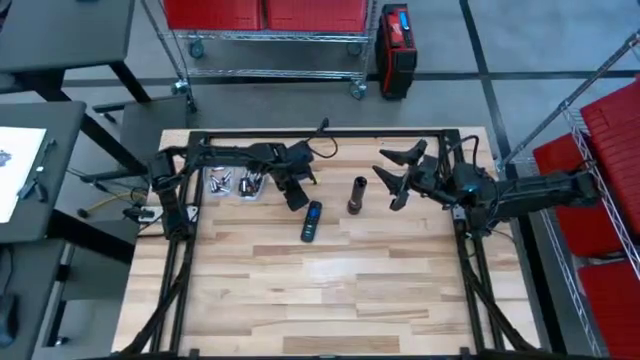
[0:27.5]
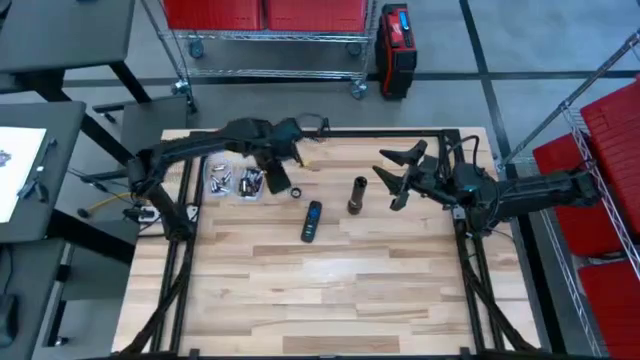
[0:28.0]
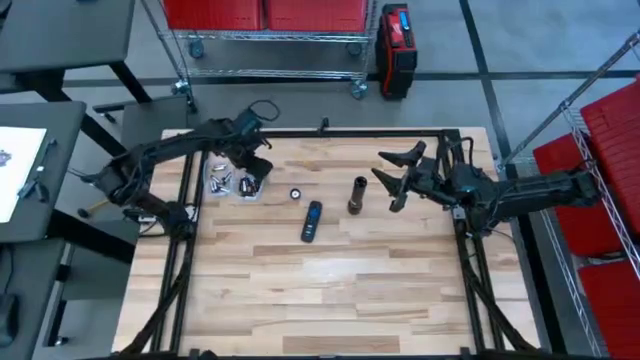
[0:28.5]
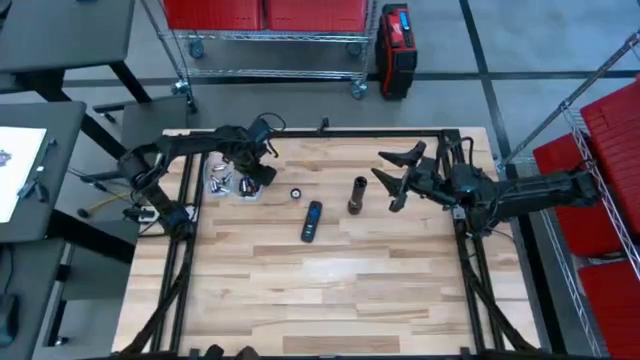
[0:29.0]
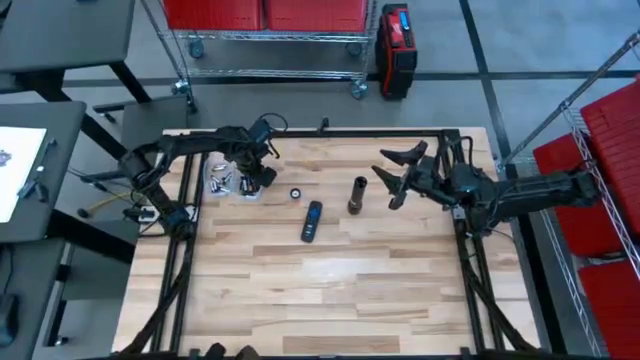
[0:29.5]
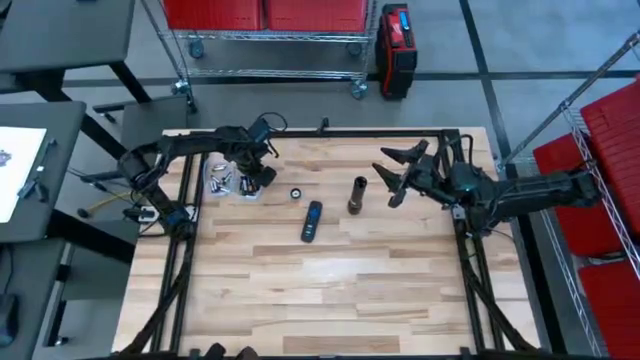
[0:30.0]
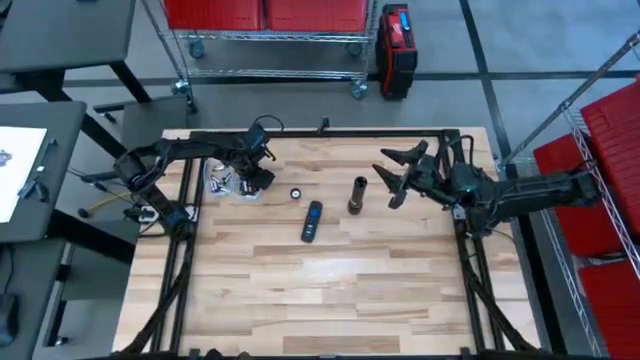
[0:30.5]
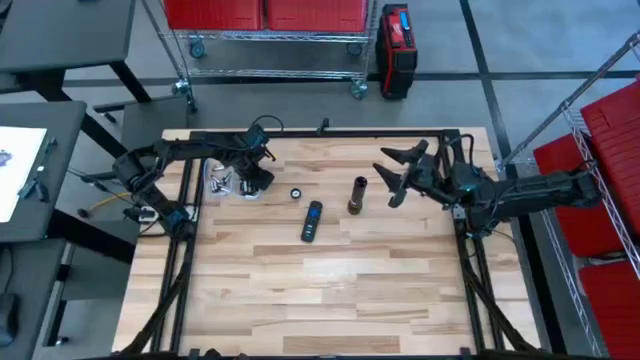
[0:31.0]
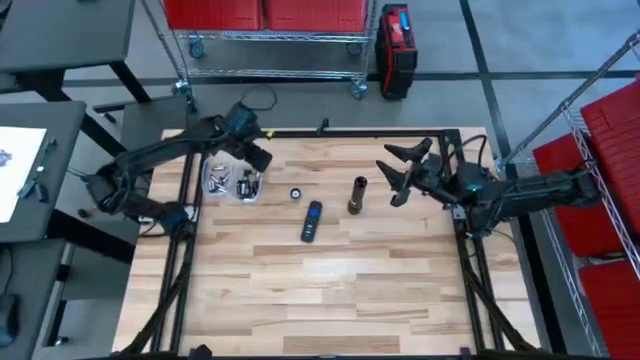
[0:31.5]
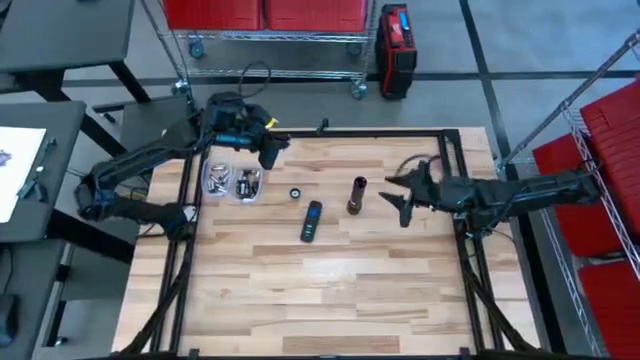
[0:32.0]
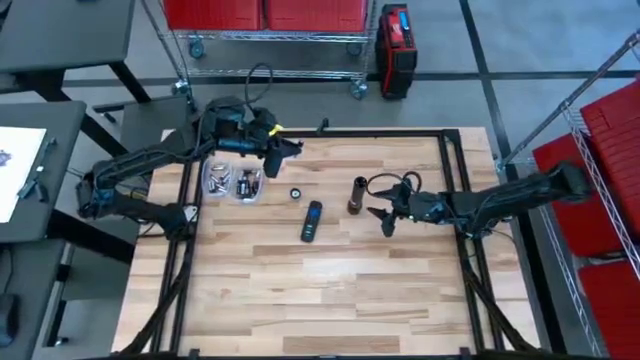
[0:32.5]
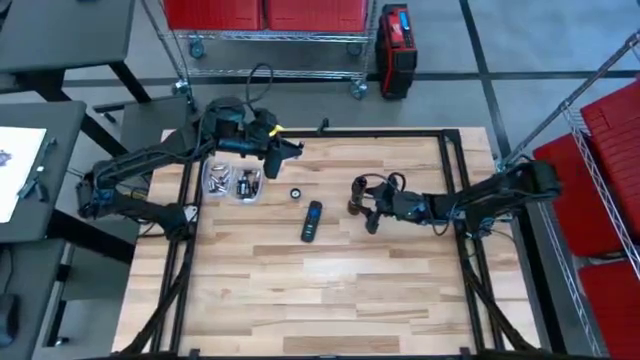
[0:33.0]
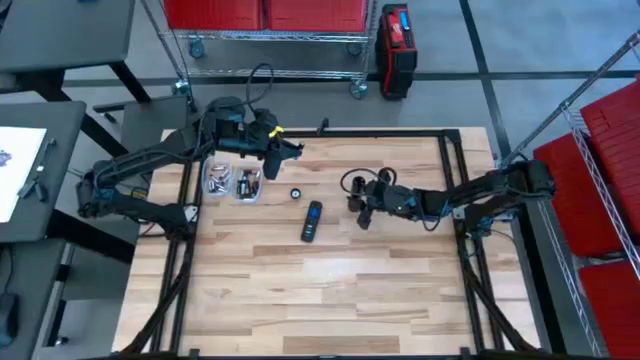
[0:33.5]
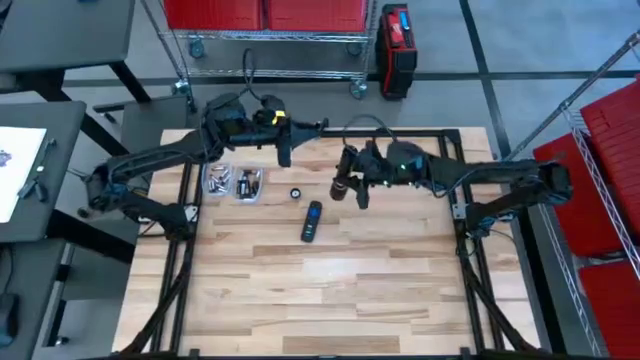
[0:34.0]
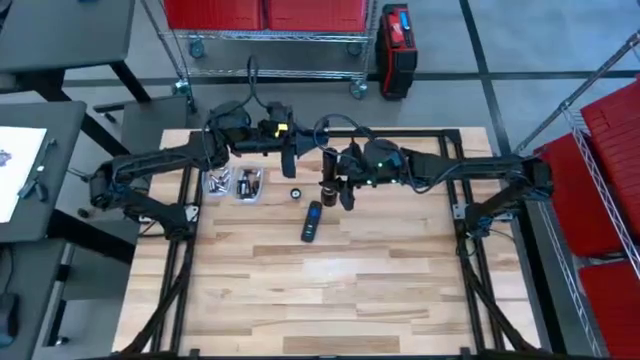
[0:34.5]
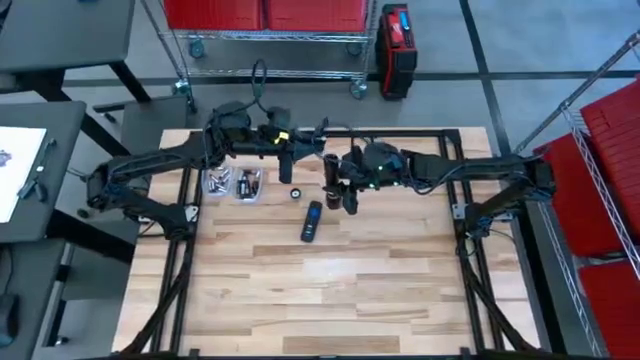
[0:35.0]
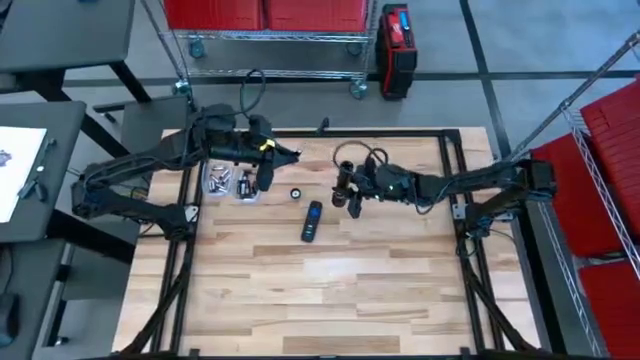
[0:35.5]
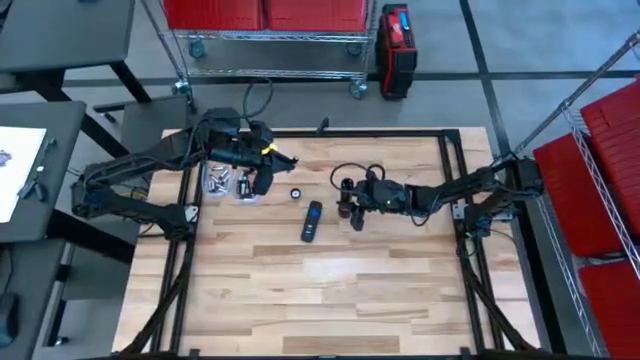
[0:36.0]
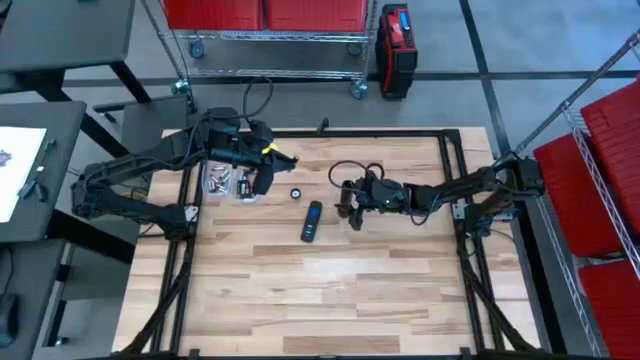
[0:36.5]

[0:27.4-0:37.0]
Task: Insert battery
Insert the silver battery into the flashlight's battery compartment

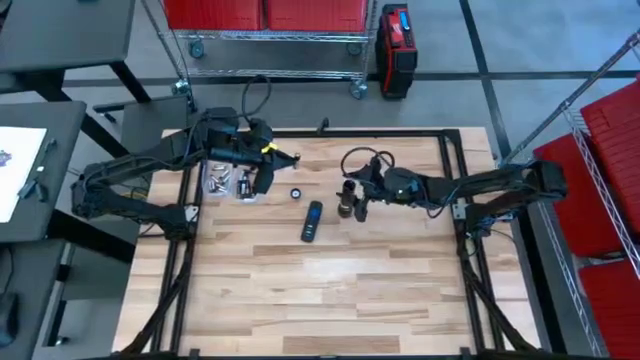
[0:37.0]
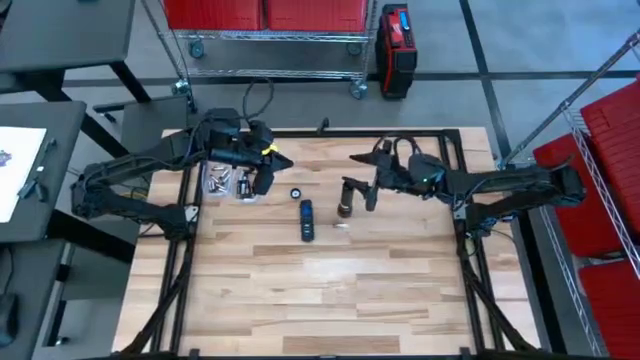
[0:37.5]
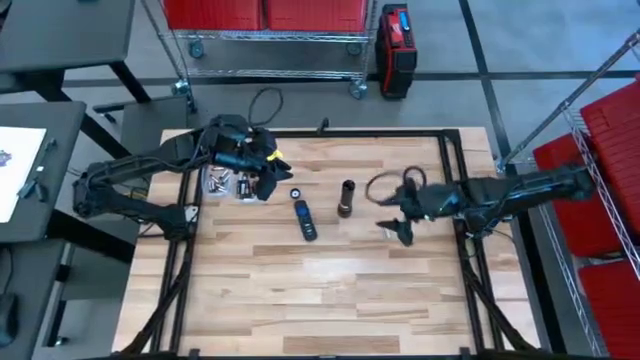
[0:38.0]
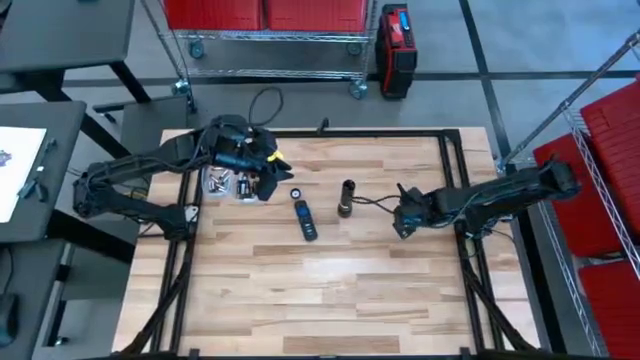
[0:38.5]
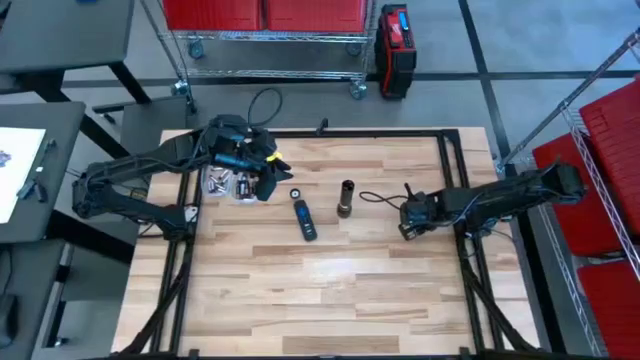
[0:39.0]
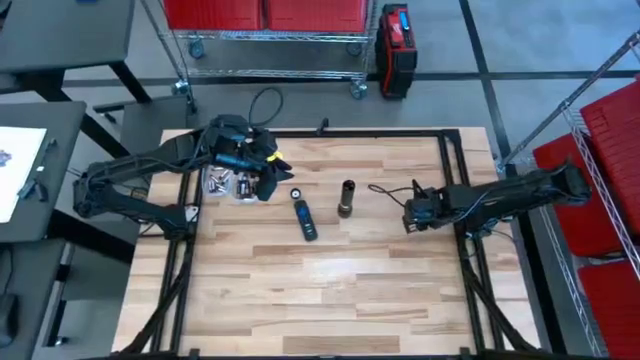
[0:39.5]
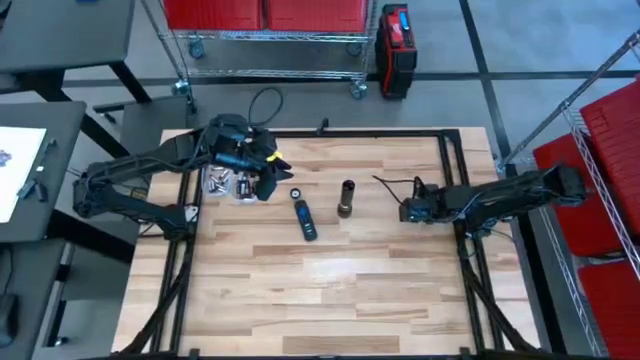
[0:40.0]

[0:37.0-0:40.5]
Insert the silver battery into the flashlight's battery compartment

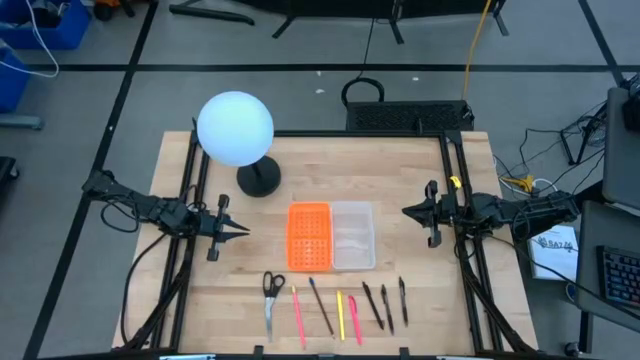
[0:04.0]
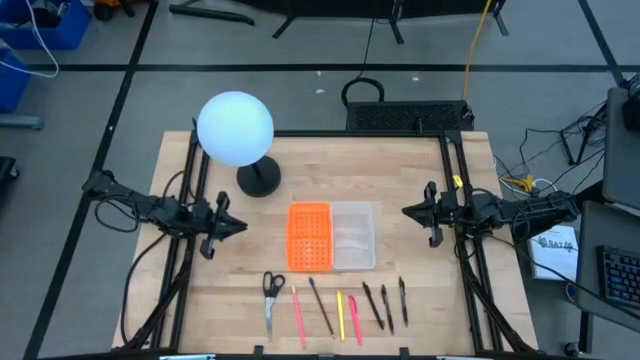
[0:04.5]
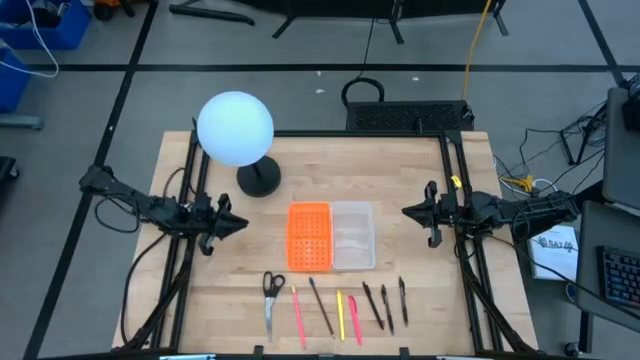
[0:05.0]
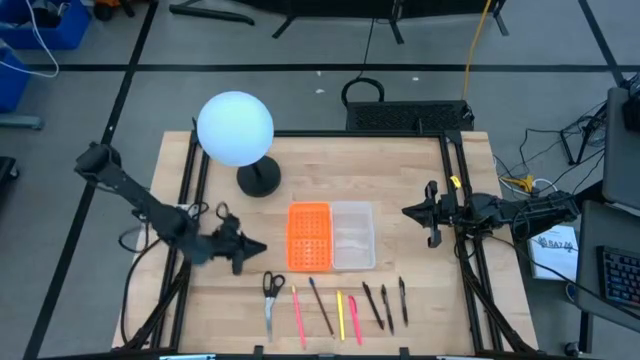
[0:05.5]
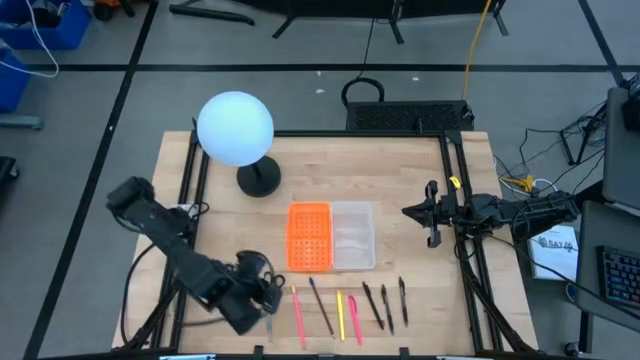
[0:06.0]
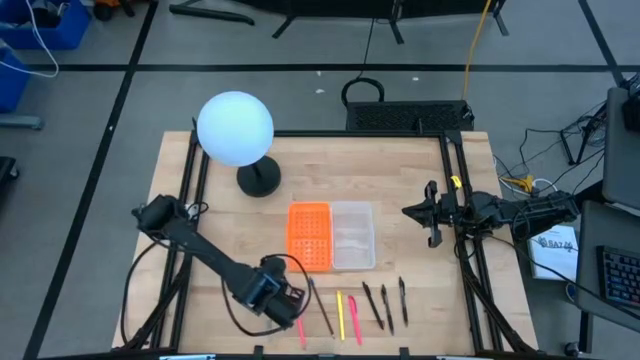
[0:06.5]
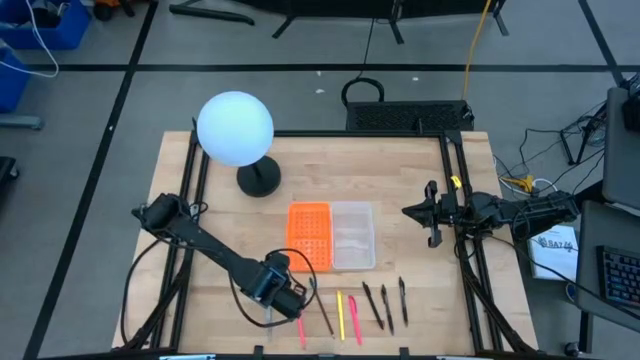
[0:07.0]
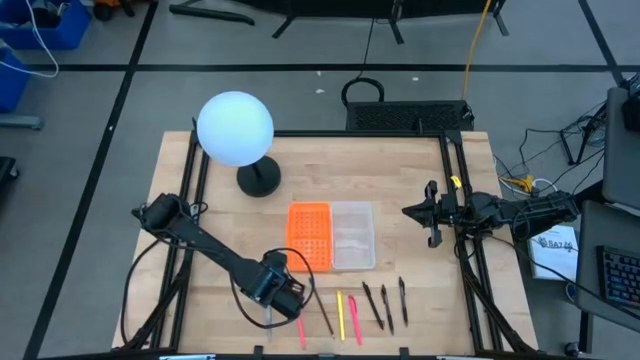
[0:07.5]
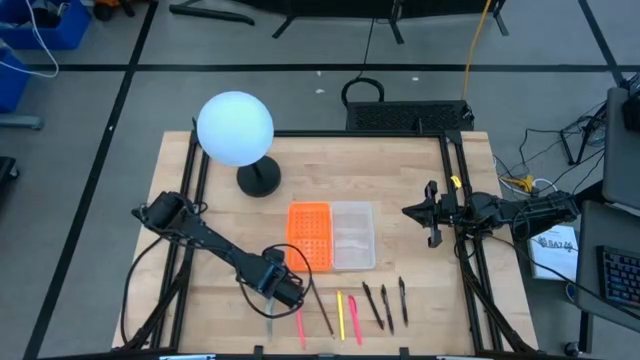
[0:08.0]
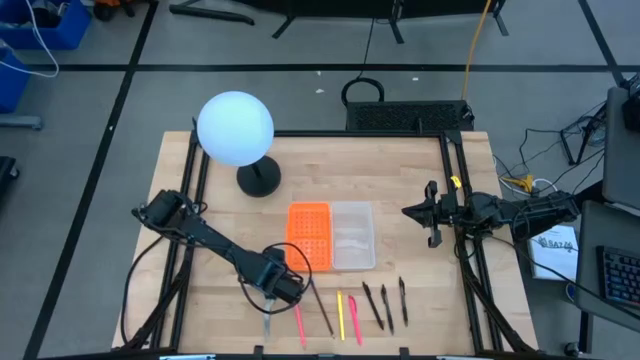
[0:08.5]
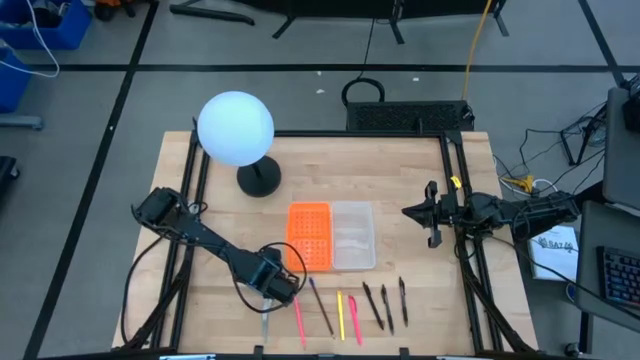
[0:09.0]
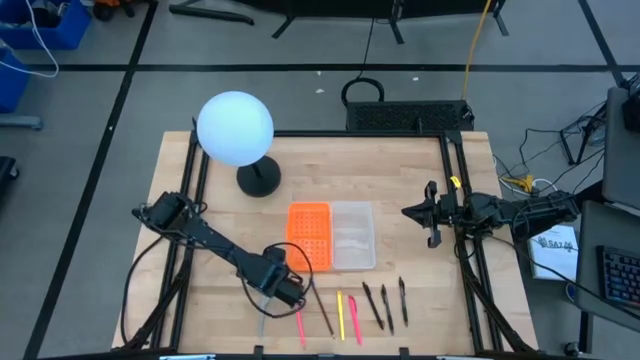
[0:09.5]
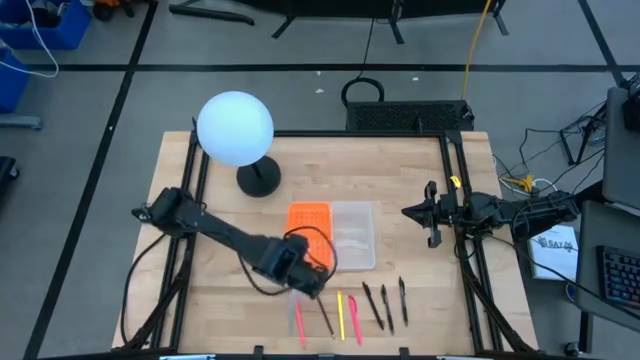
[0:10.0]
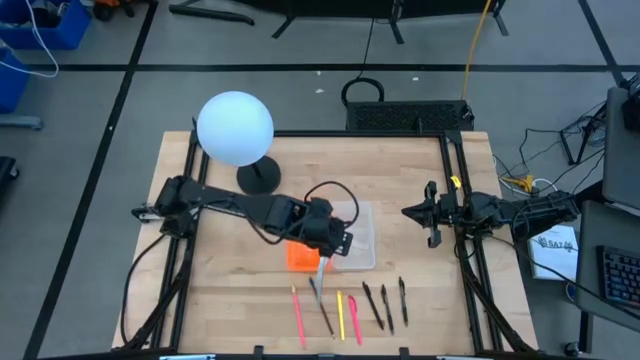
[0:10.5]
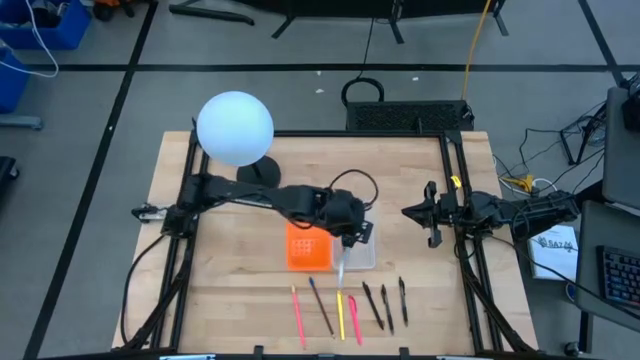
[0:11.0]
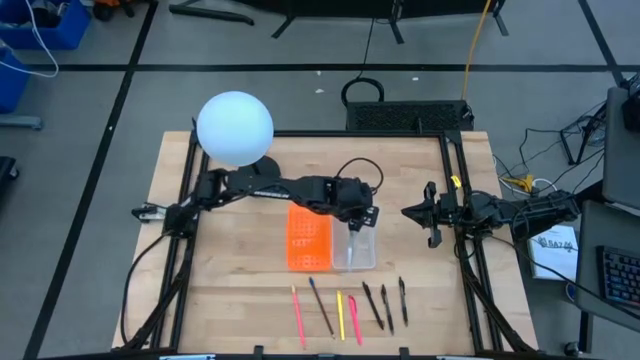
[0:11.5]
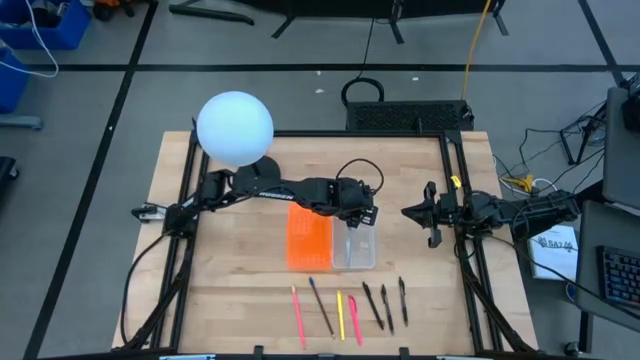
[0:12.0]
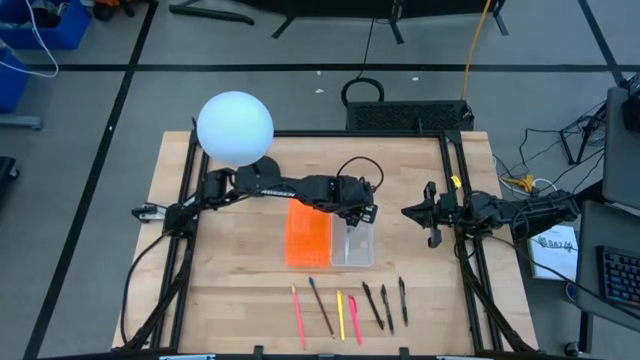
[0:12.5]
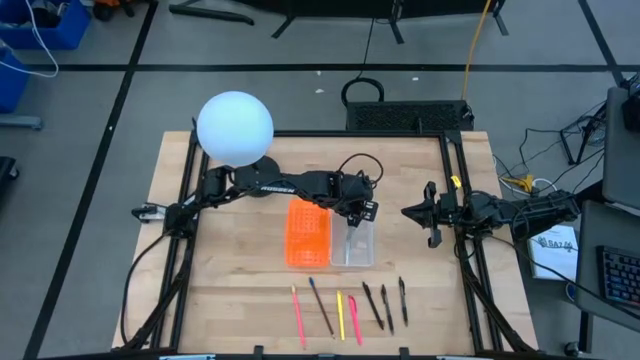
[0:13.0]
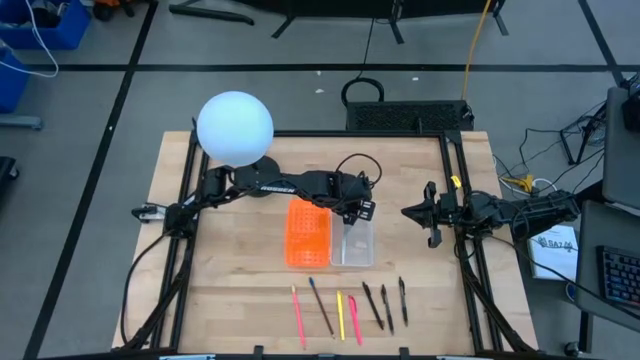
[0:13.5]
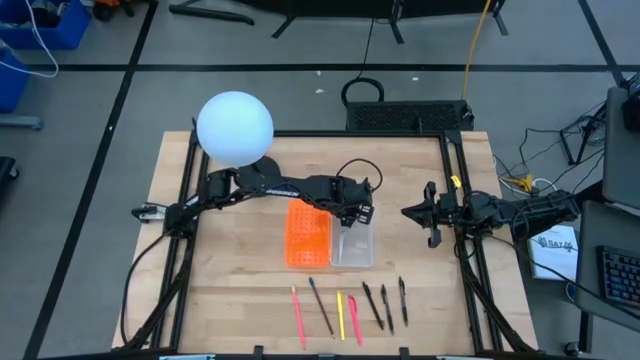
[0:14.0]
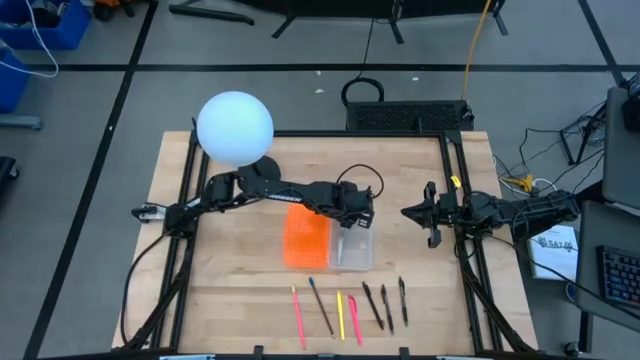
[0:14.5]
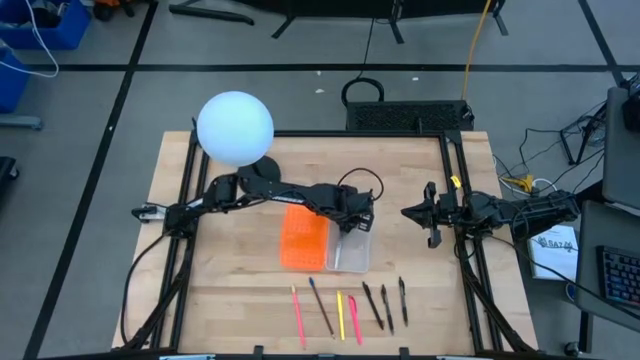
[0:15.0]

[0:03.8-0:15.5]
Task: Pick & place school supplies into a supply box
Put the black scissors into the orange supply box
